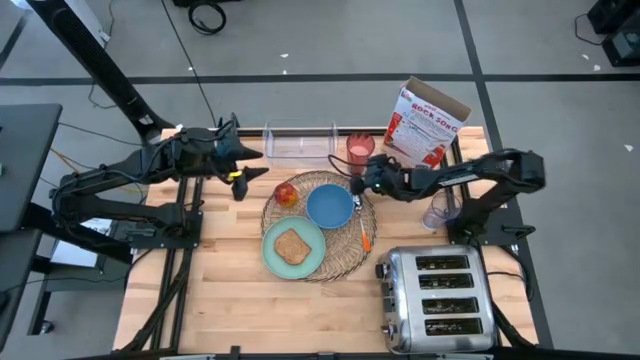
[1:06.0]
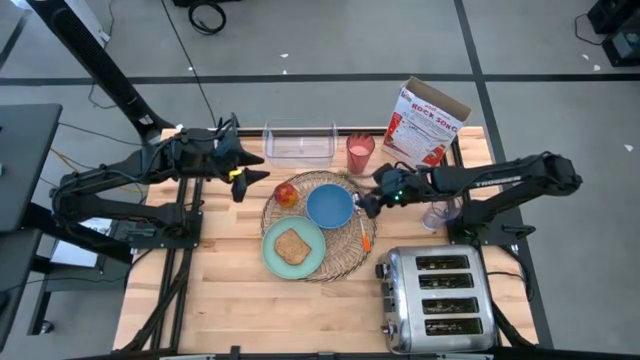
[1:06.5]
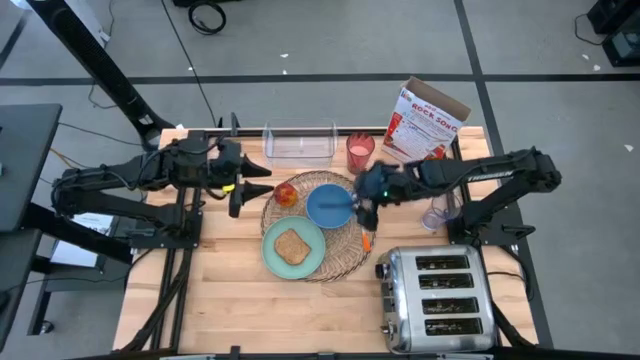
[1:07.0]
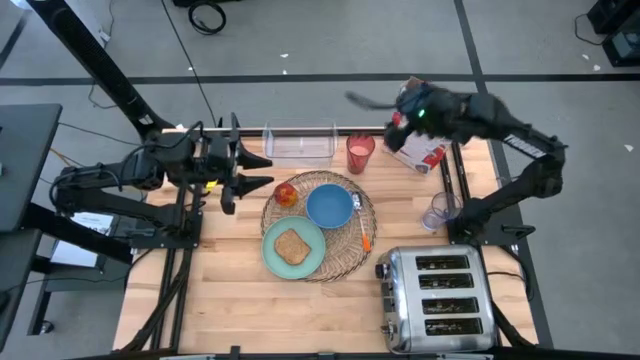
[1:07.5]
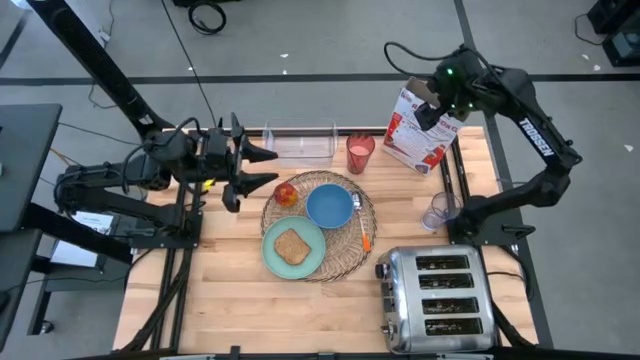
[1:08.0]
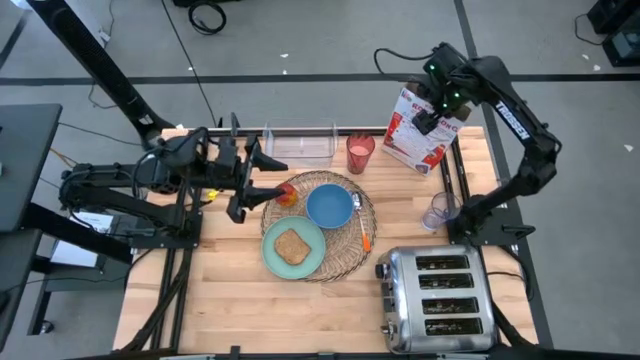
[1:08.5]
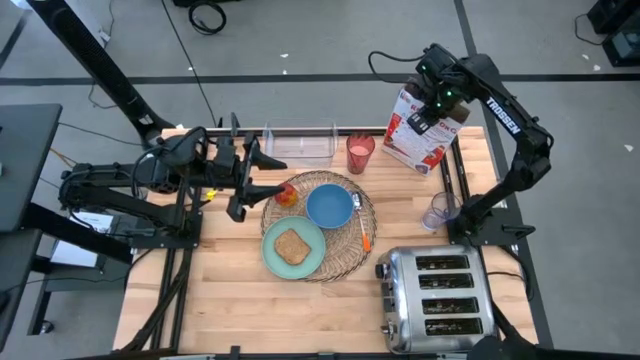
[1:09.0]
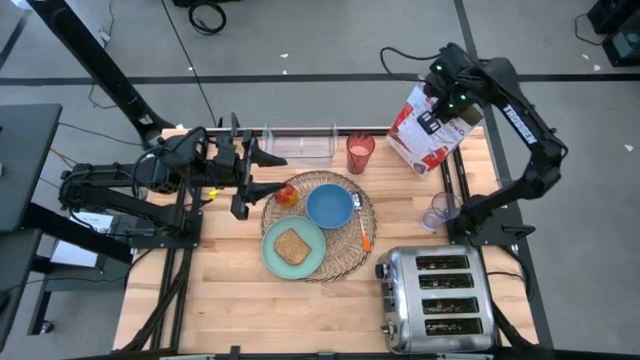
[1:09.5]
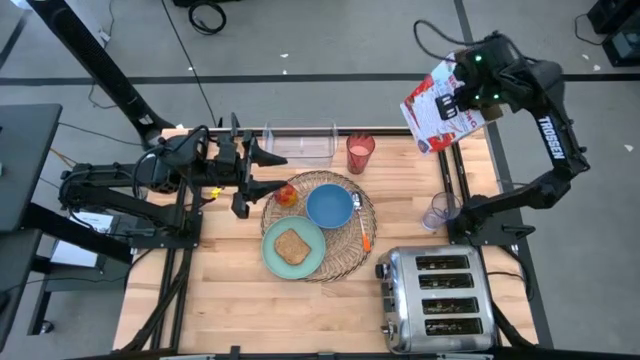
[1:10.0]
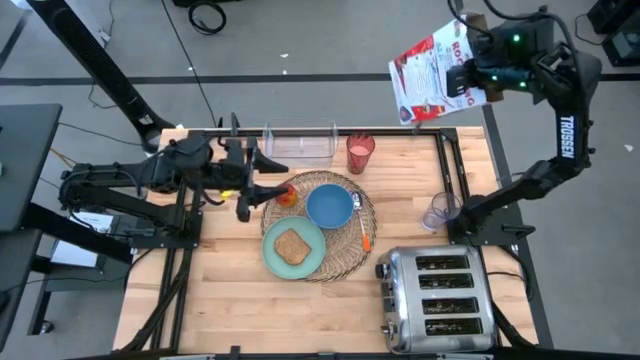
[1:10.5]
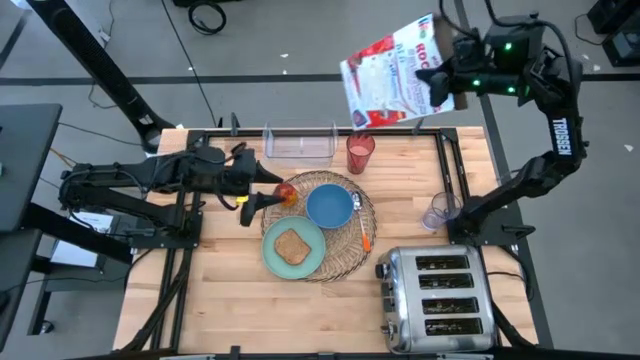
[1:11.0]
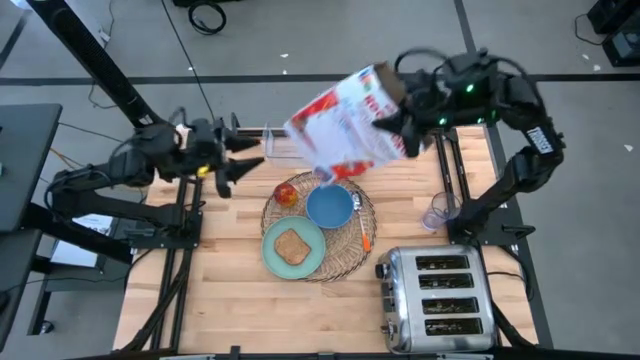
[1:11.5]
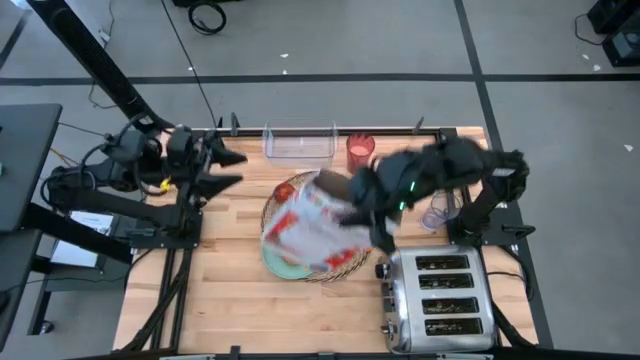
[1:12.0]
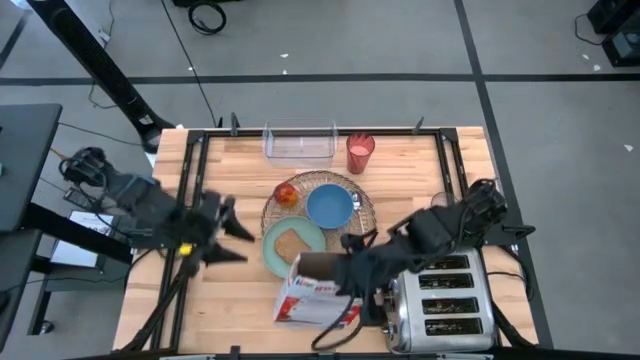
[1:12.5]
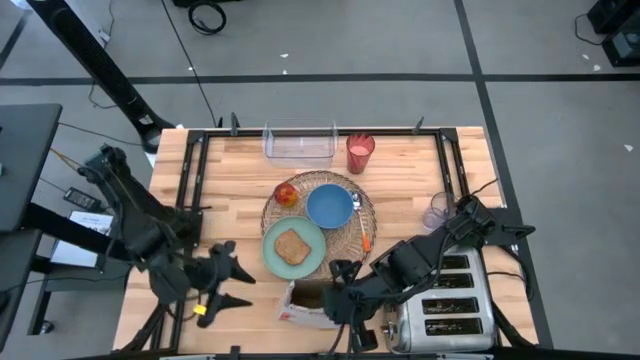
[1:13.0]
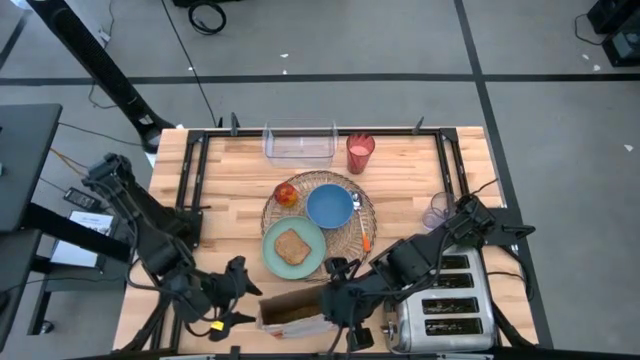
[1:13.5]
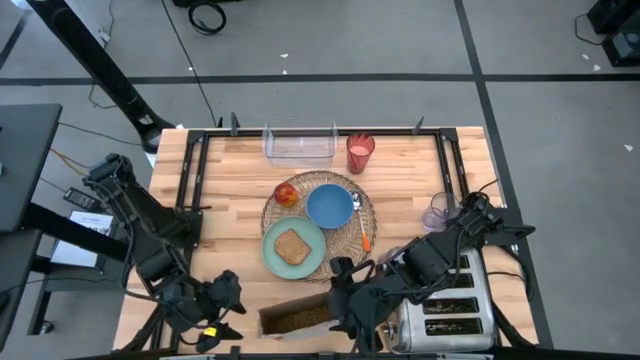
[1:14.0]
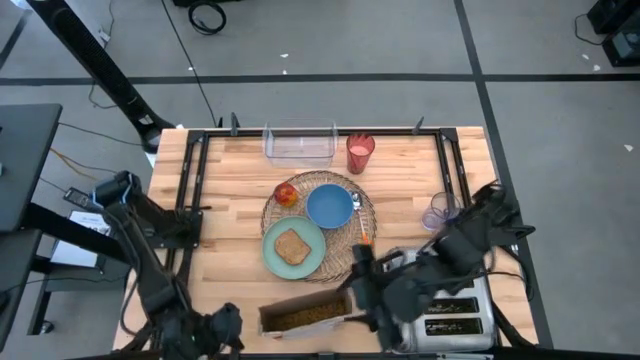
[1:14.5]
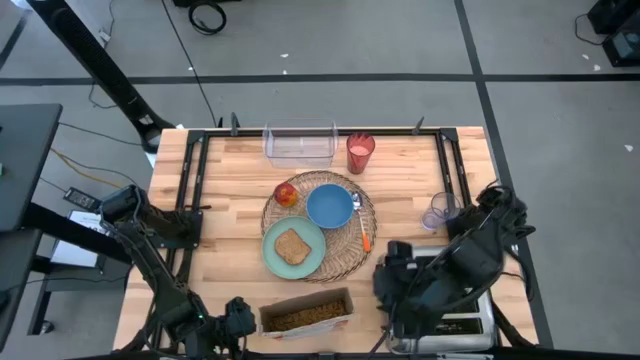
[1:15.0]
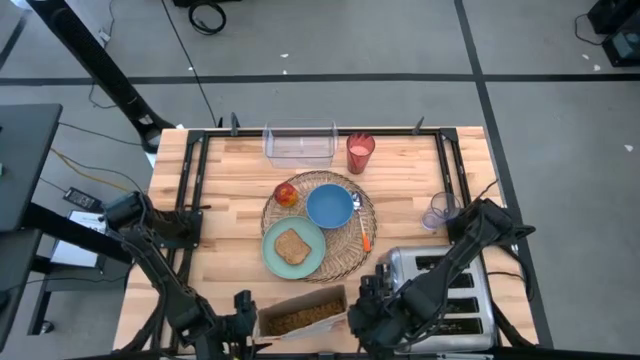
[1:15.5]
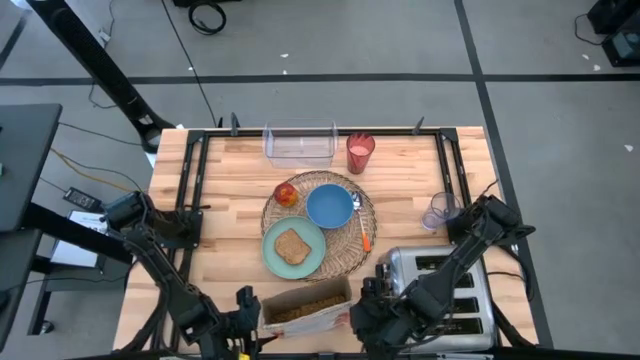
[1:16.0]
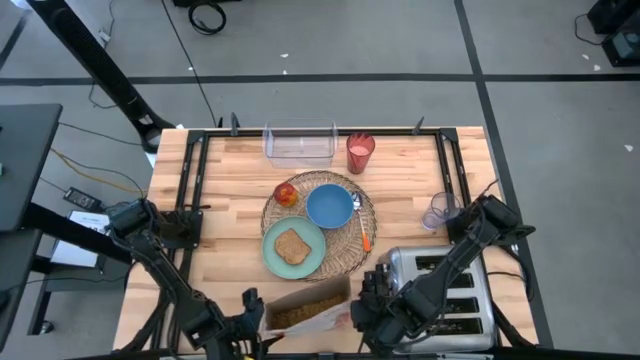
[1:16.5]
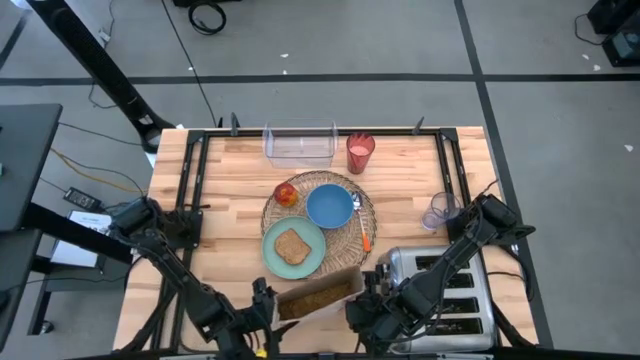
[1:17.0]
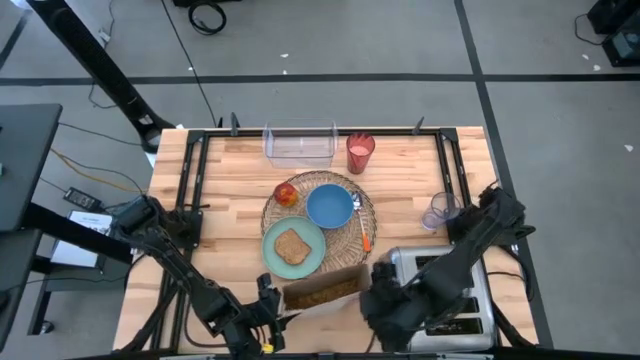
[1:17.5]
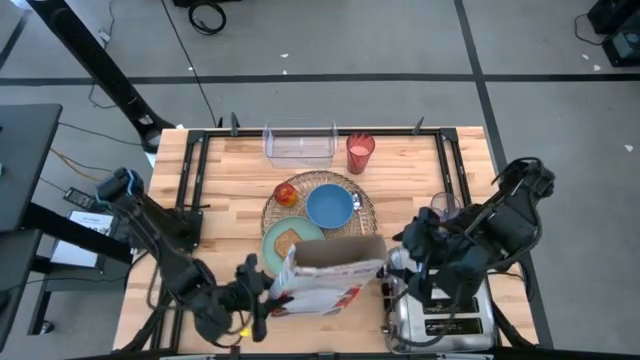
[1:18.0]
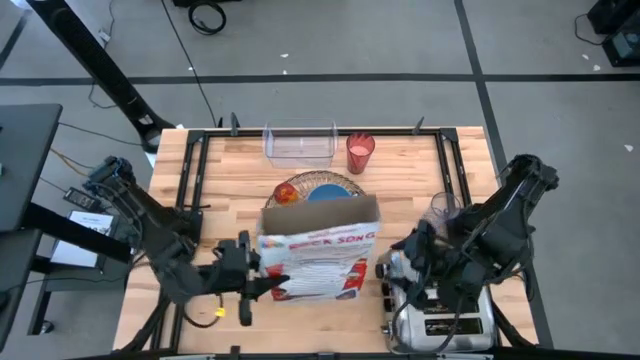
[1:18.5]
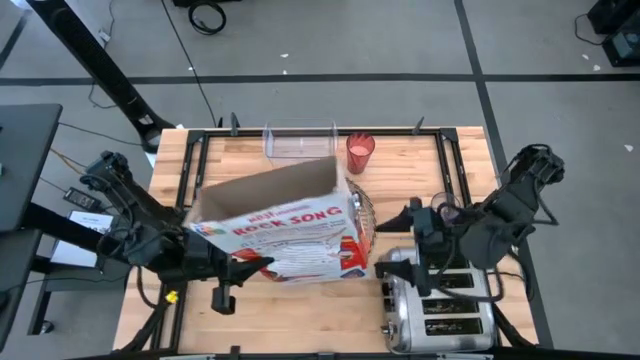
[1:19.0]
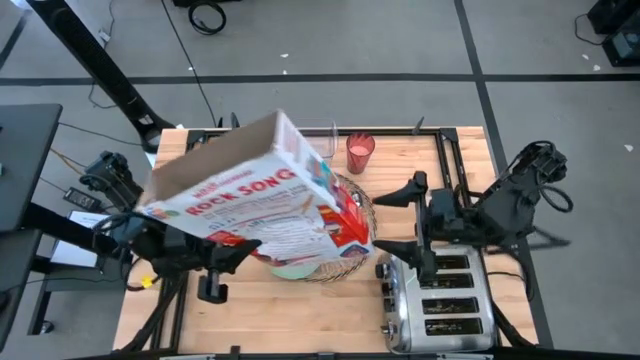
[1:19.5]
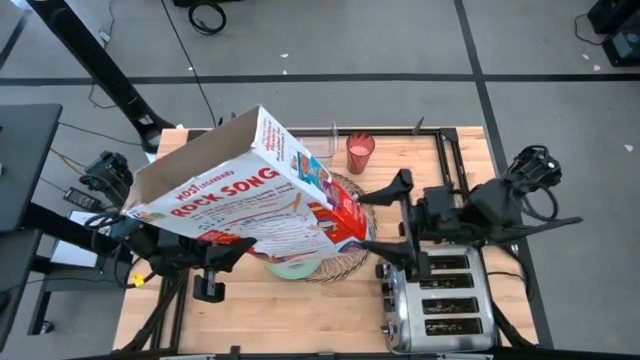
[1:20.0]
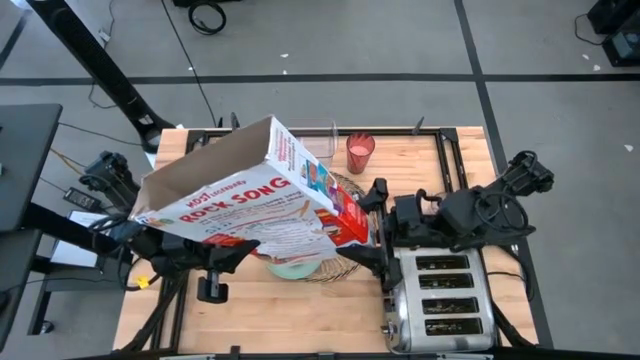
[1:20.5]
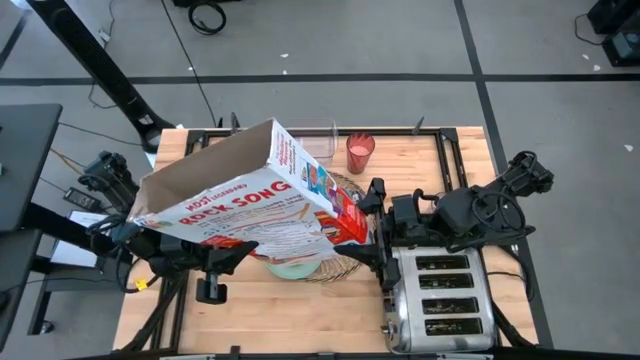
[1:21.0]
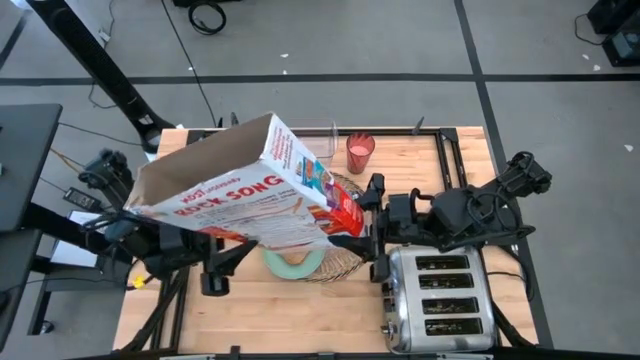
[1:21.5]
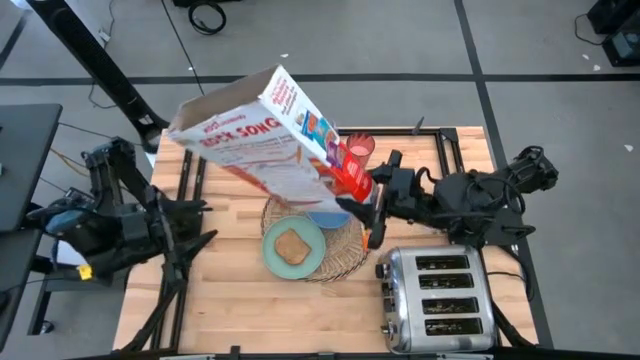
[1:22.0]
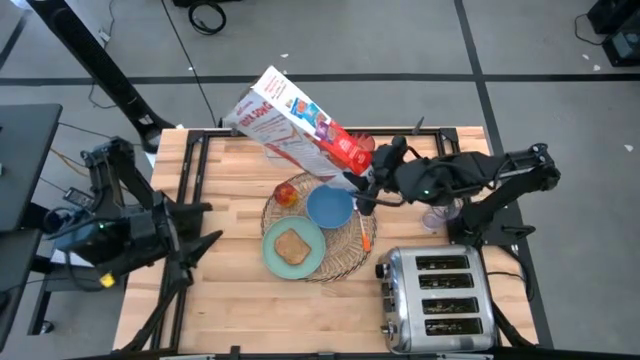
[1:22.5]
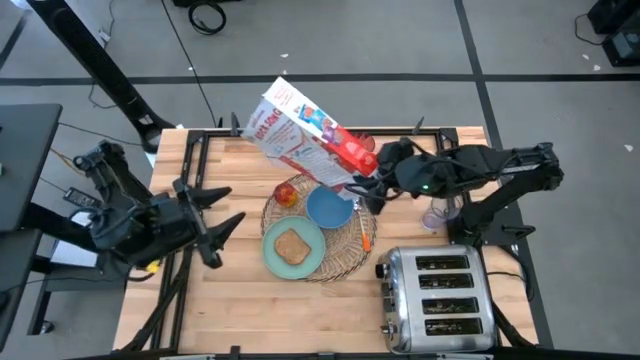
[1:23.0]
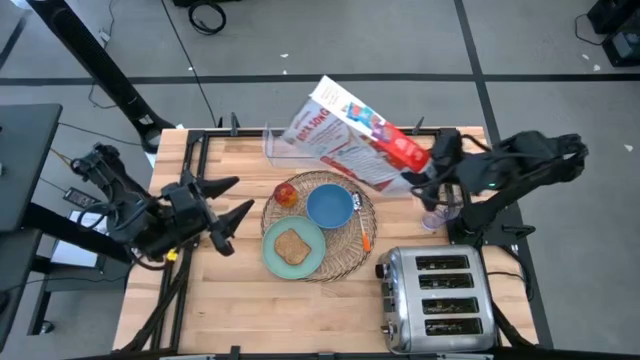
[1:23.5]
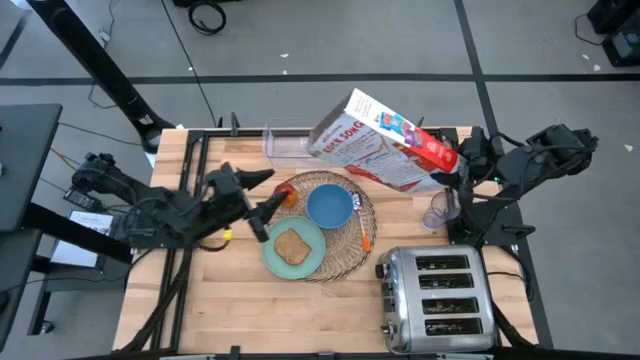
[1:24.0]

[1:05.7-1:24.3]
Task: Arrange a breakfast setting
Pour the cereal into the blue bowl

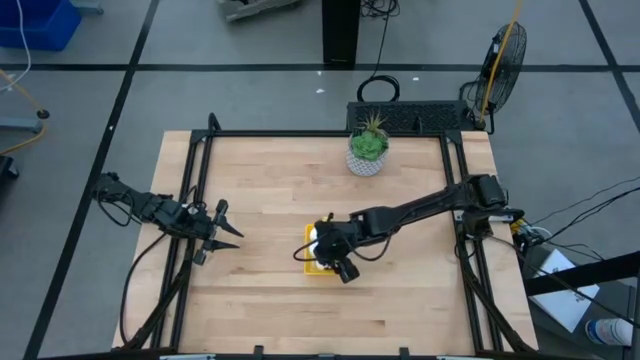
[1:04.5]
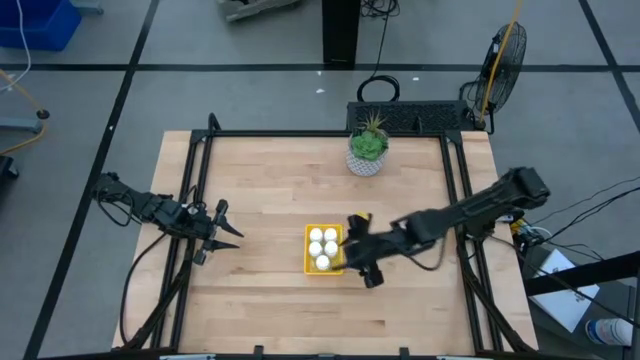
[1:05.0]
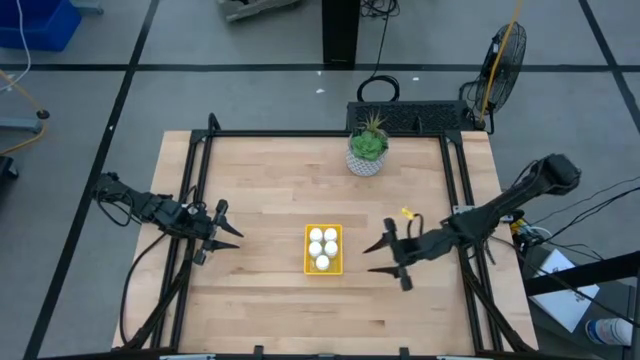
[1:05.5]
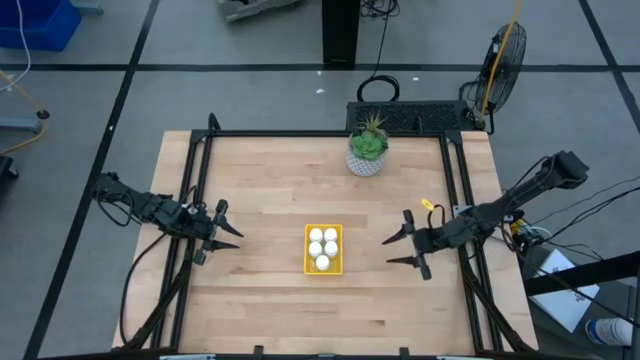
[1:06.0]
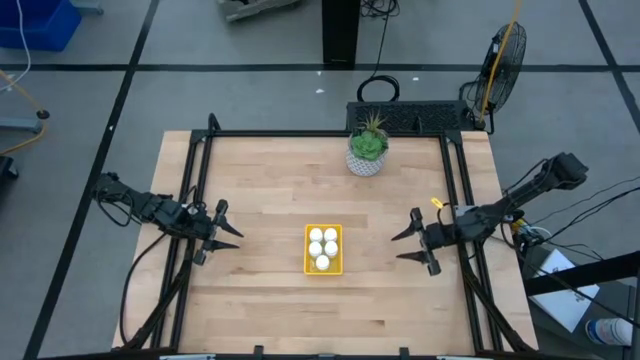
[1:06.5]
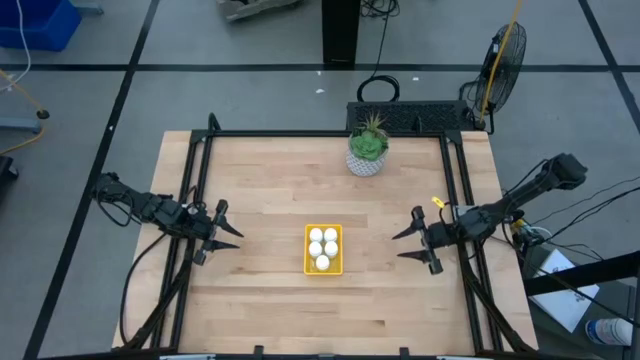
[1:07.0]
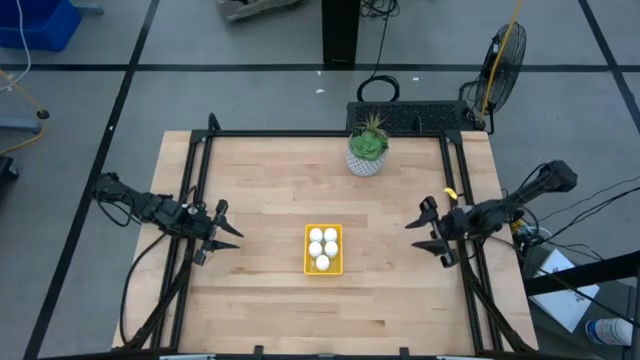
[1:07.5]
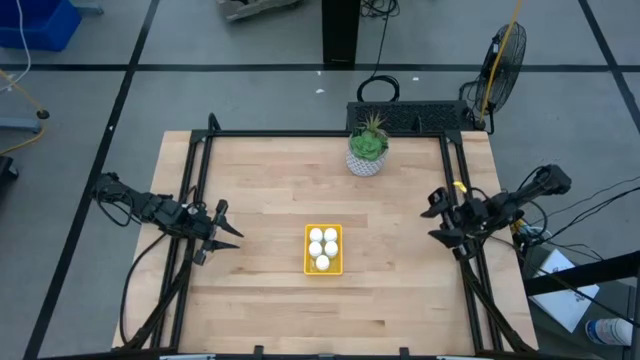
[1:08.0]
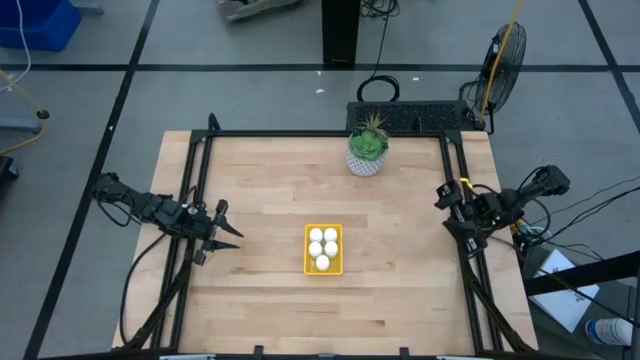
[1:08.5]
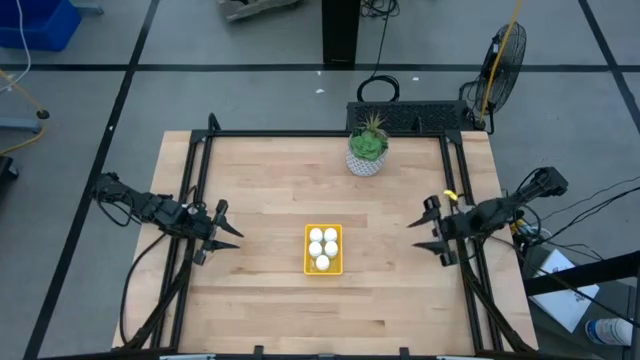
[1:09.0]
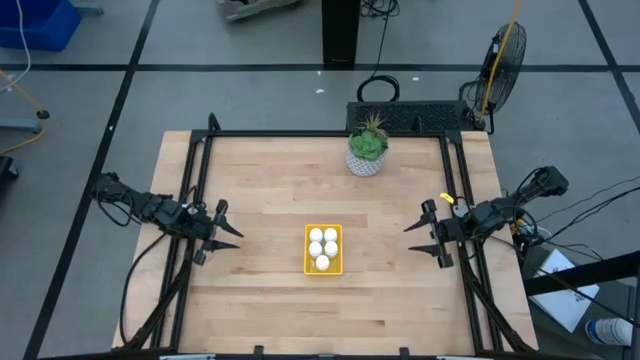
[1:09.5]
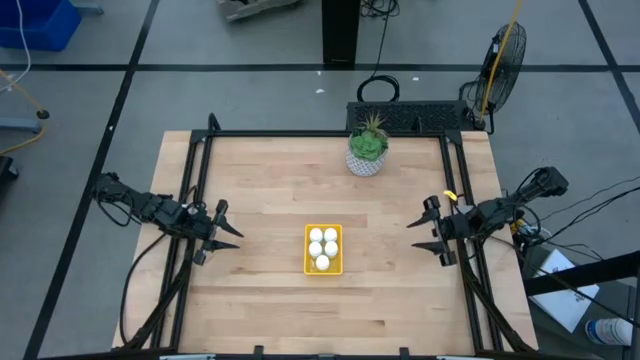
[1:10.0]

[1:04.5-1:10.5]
Task: Pick and place pill bottles into a basket
Return to Home Position
